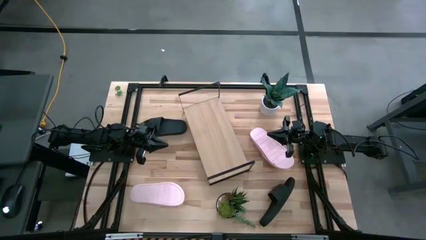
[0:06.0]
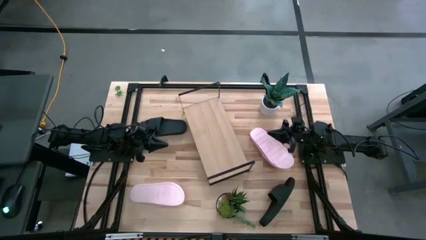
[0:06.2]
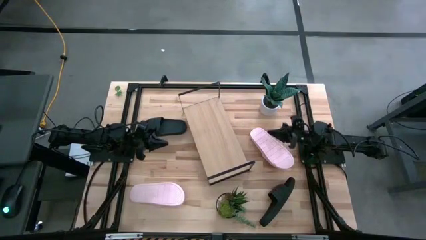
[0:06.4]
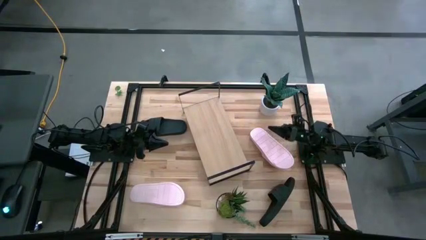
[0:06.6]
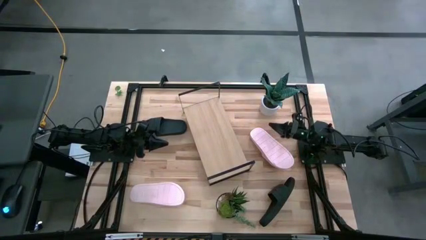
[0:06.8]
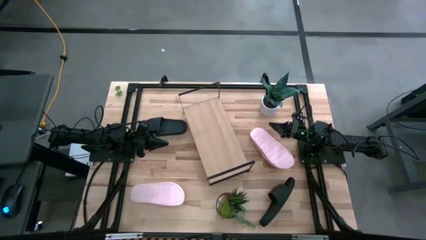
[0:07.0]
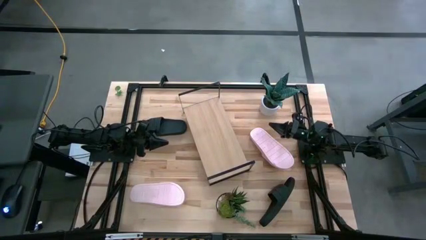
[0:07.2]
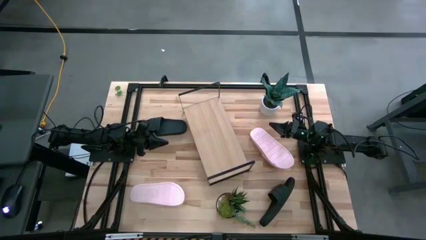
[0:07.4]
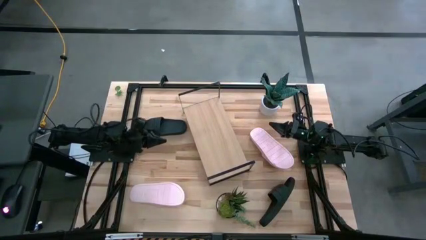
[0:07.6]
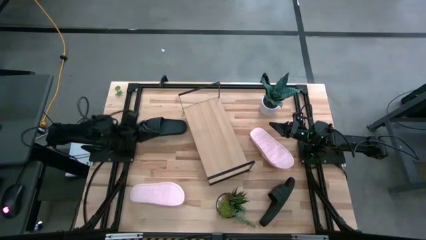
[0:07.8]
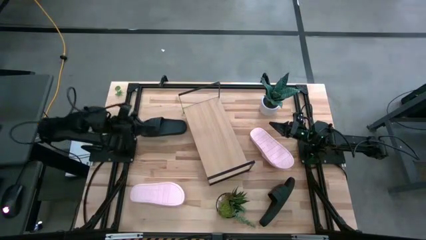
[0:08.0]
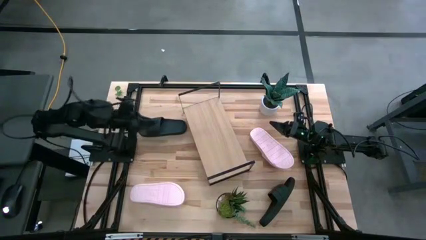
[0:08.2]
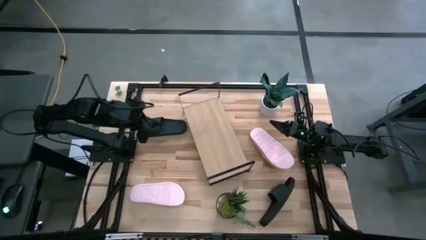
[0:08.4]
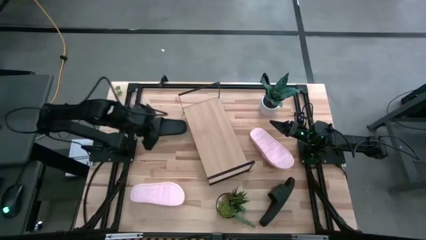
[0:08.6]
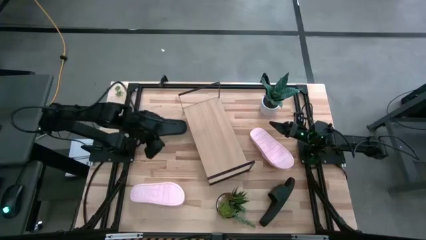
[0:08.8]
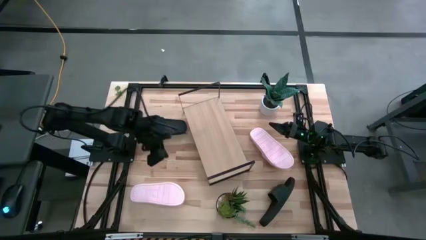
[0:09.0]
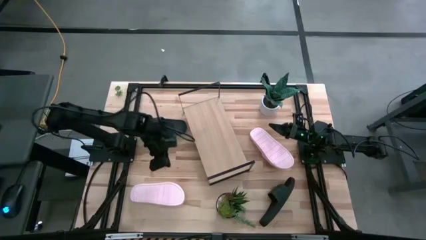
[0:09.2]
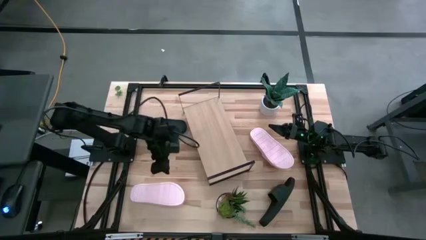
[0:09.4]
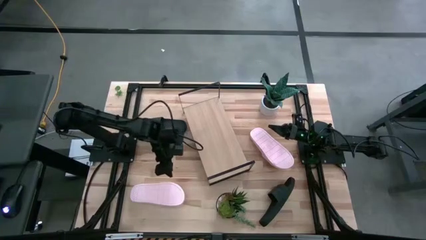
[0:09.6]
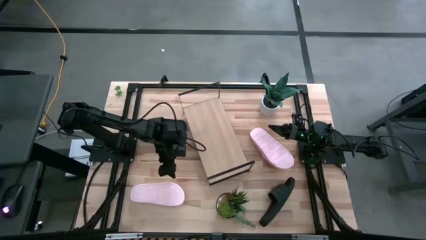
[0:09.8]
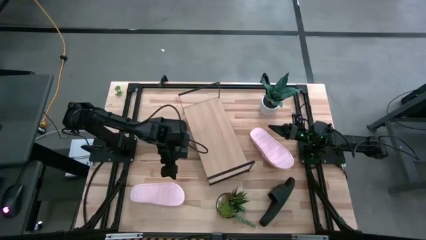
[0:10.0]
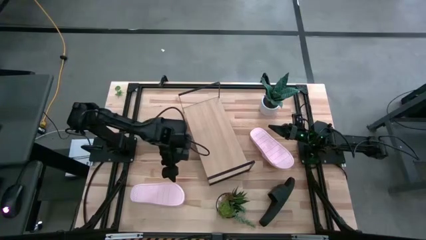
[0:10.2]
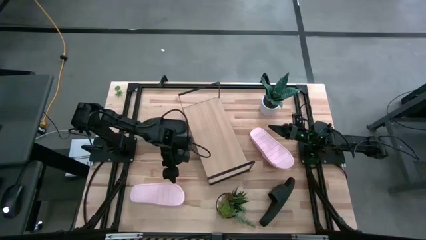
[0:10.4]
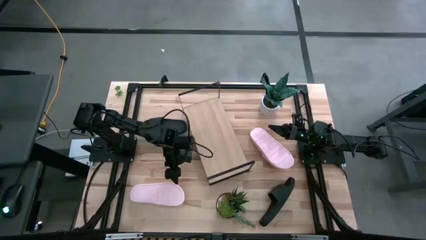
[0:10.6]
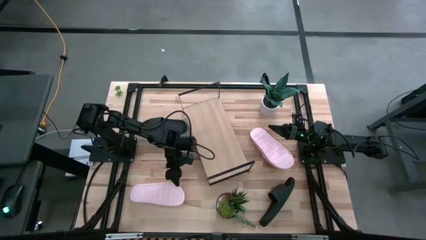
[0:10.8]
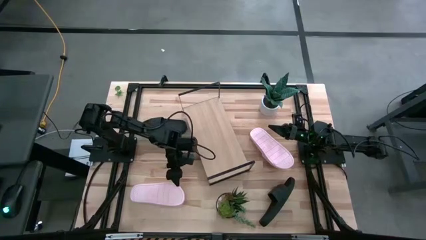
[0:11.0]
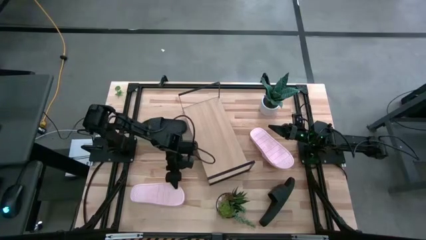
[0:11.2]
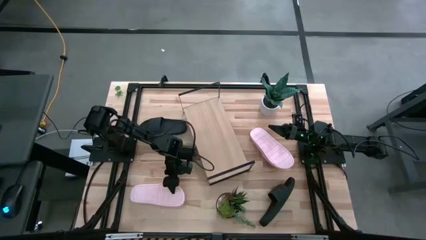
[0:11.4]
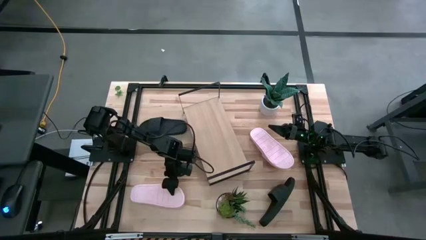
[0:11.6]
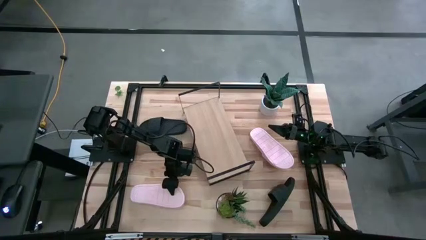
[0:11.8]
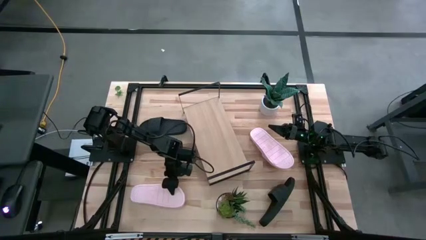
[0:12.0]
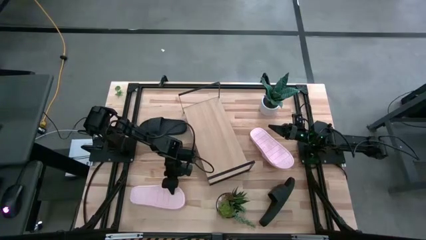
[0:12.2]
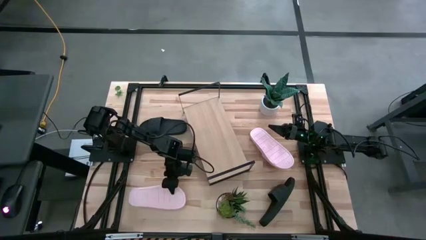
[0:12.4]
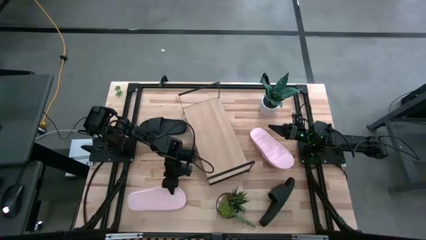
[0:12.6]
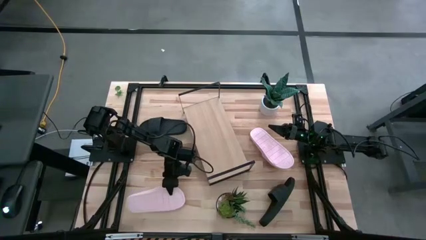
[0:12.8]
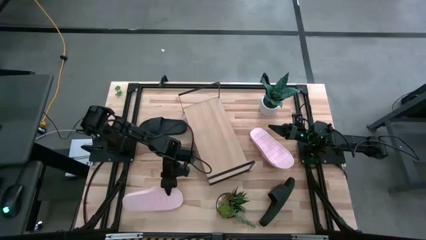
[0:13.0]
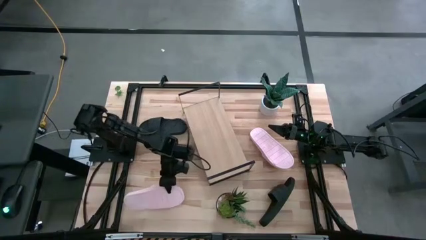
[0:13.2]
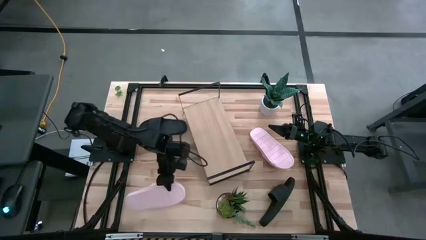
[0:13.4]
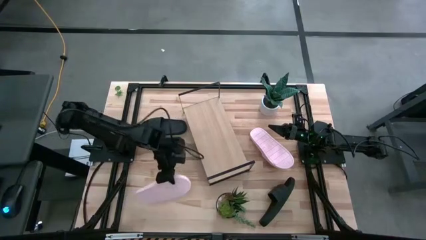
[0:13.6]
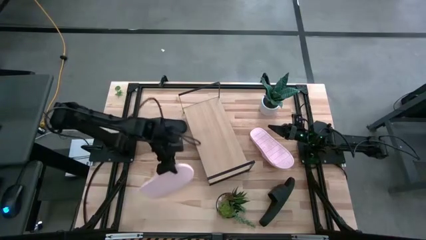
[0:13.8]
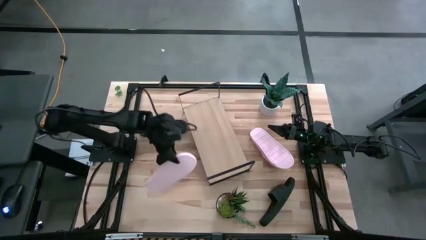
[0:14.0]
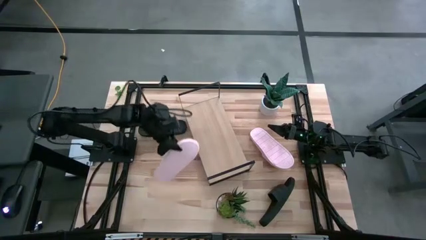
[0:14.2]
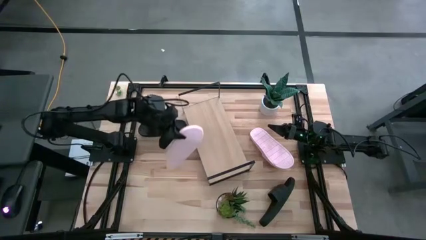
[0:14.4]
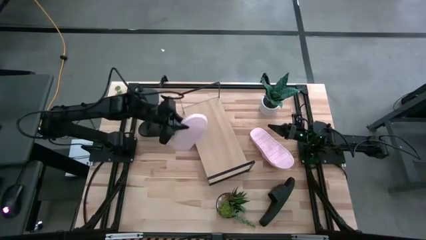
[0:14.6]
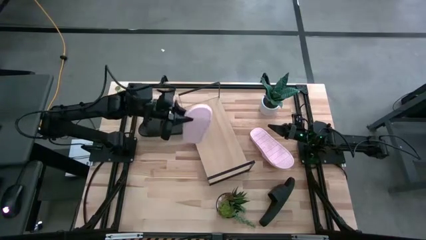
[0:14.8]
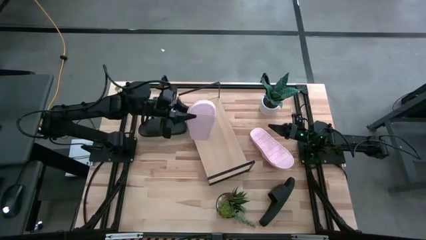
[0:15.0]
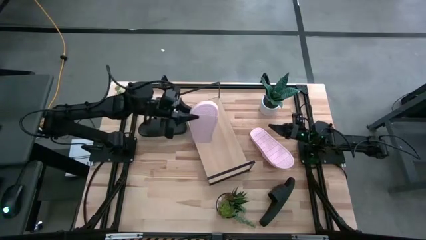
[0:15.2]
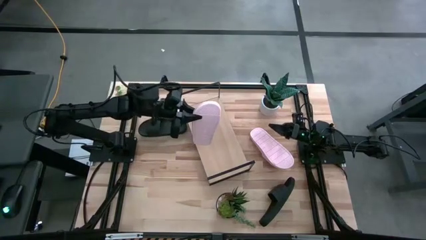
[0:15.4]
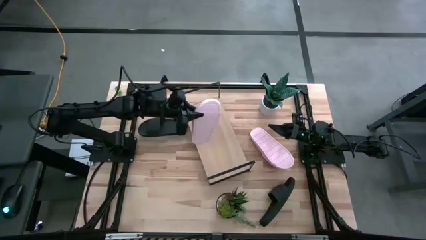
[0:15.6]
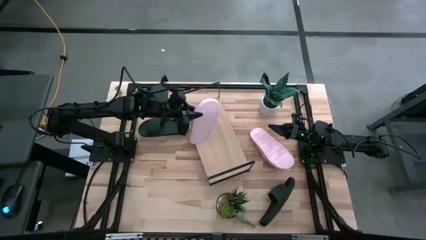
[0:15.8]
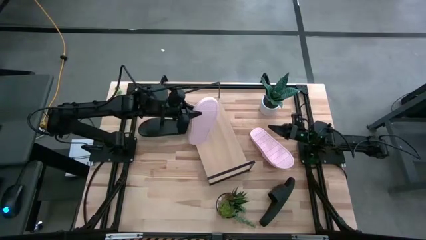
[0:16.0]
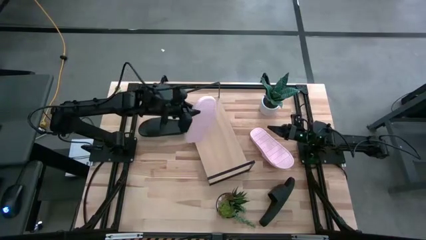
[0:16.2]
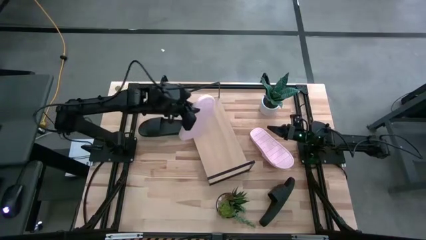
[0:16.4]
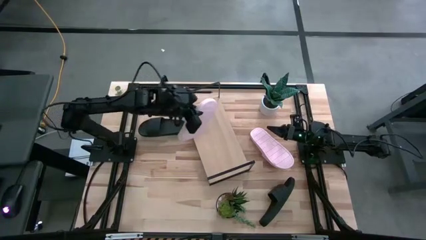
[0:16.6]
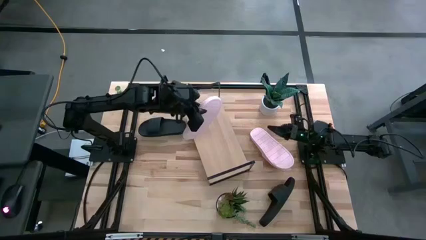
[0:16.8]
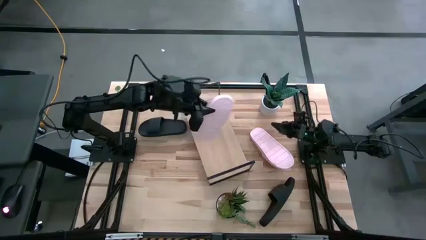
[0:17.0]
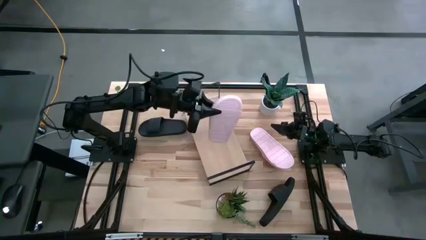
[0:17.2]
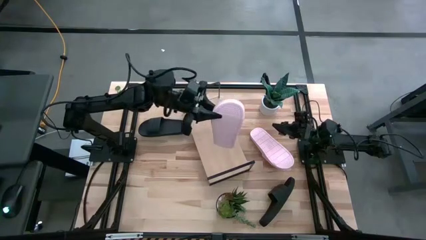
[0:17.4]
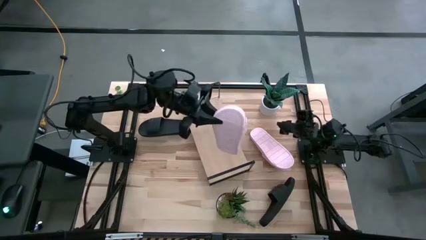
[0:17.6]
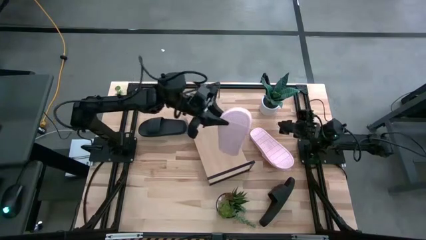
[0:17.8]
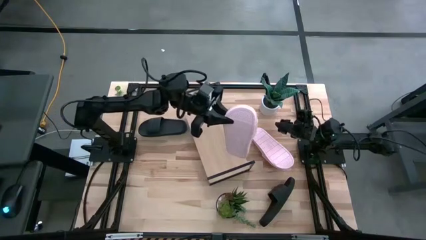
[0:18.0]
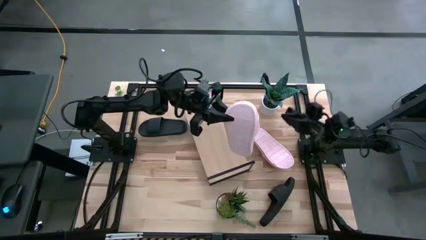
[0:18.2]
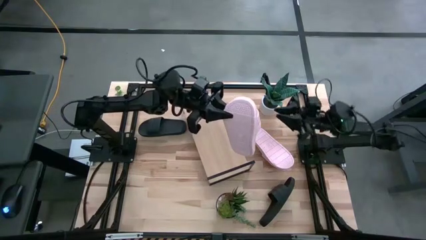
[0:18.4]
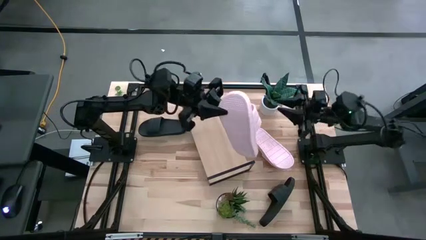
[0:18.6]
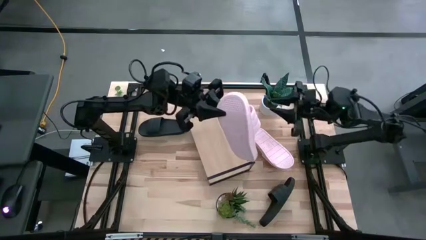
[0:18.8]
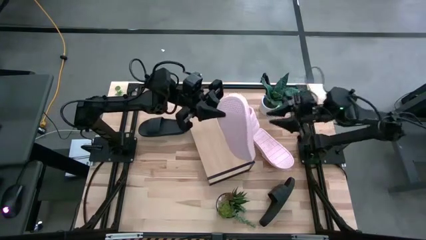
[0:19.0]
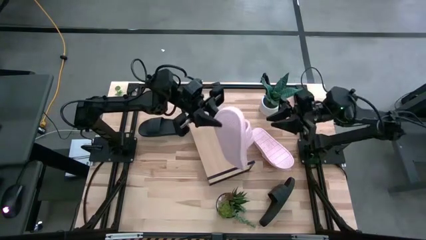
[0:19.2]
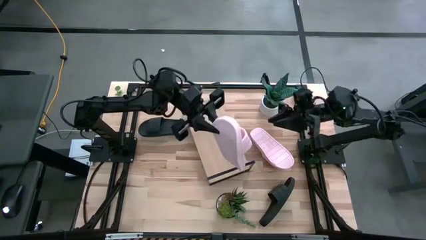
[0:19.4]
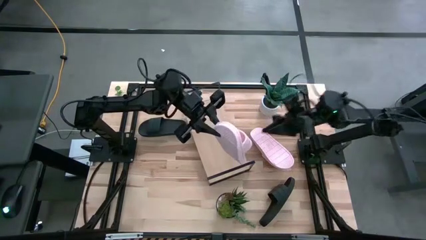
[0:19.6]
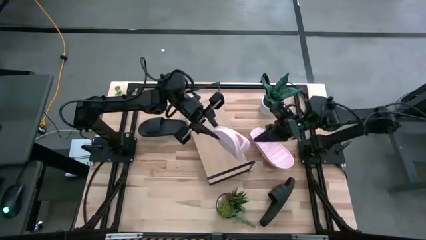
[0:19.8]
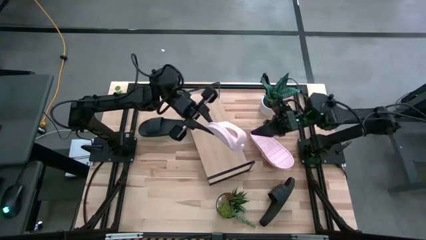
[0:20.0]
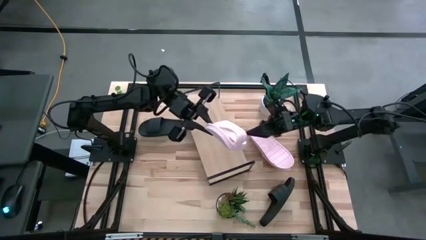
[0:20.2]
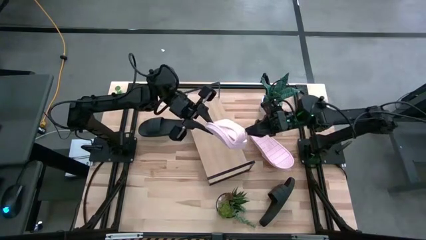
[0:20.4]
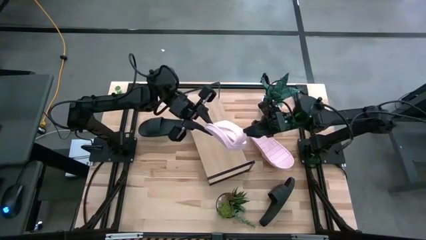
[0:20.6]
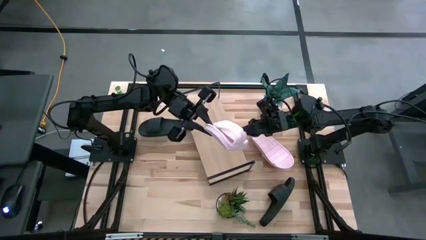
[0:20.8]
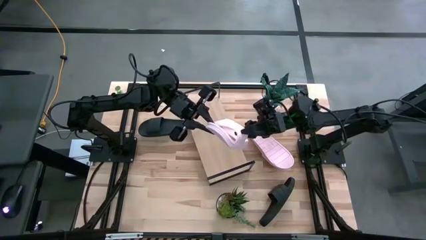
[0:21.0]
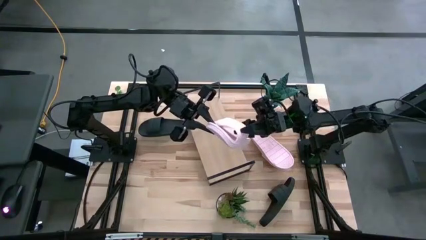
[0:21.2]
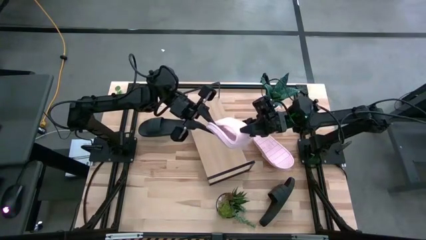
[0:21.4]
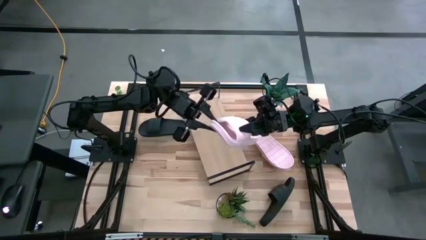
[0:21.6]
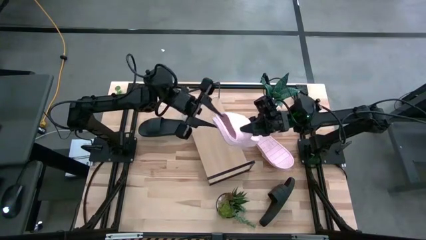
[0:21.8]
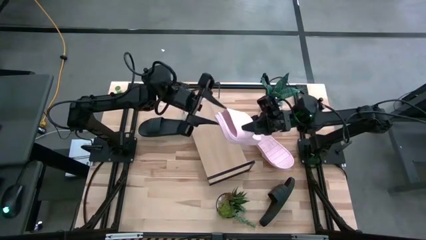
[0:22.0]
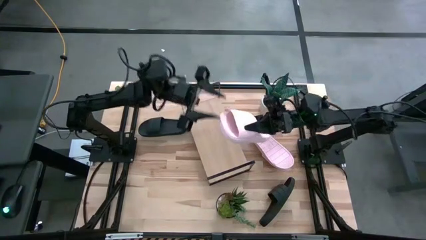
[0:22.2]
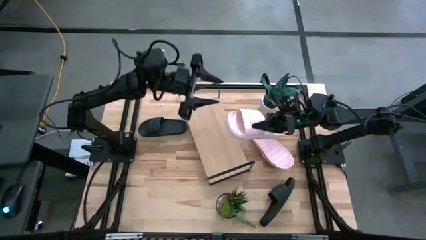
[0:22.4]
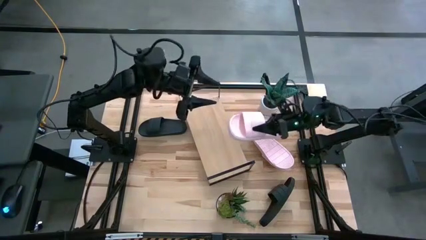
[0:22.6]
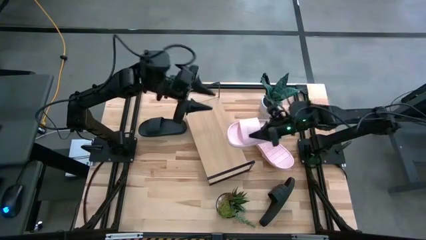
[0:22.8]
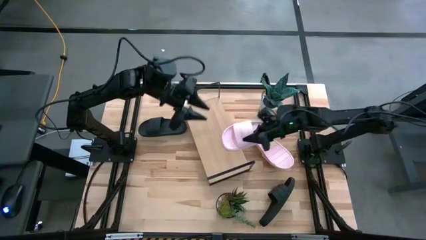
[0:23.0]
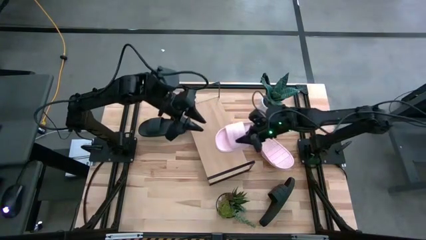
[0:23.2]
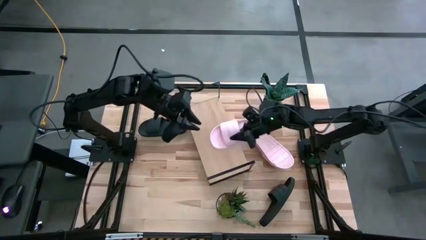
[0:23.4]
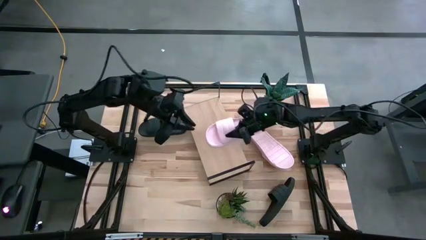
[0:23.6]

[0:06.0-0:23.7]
Task: Pick and place slides into the shelf
Put the left pink slides on the shelf
